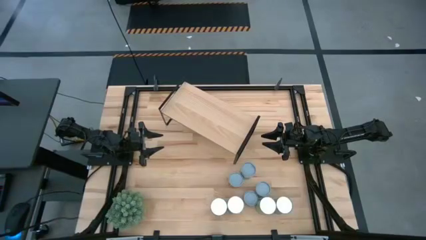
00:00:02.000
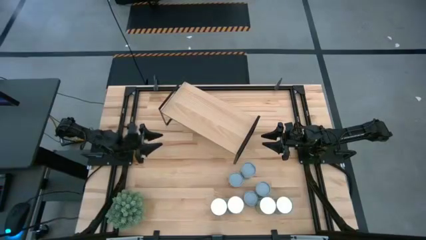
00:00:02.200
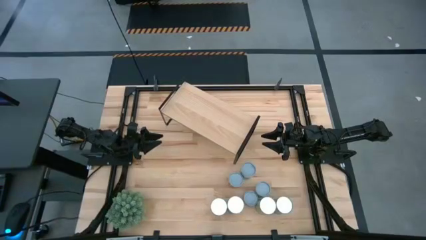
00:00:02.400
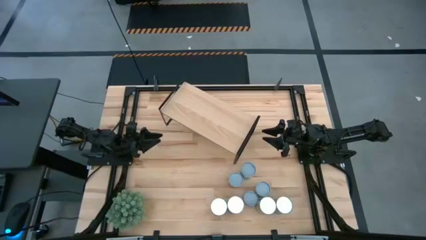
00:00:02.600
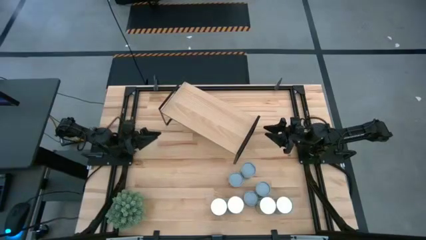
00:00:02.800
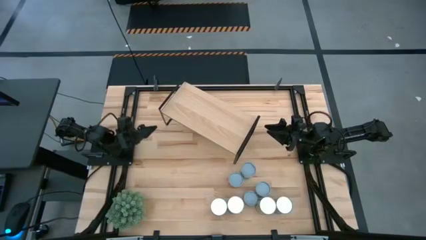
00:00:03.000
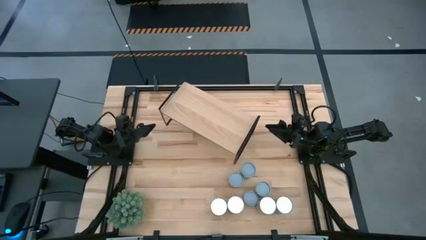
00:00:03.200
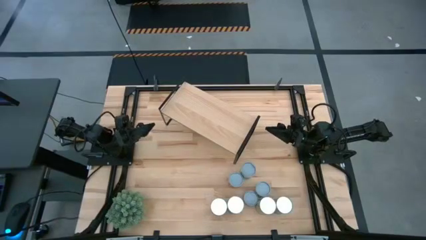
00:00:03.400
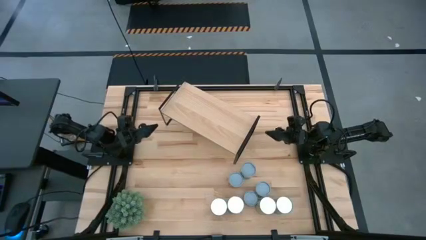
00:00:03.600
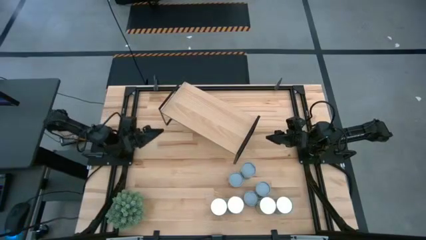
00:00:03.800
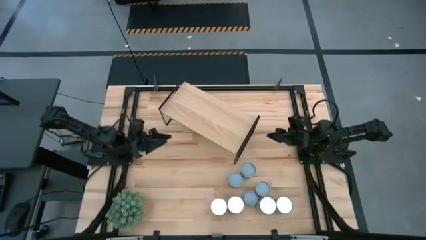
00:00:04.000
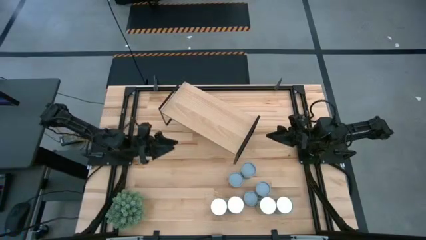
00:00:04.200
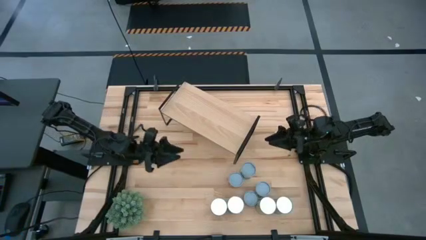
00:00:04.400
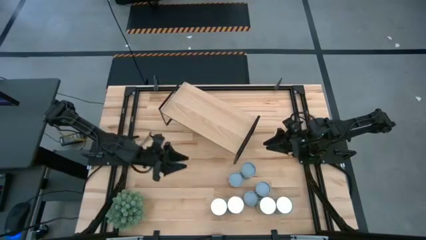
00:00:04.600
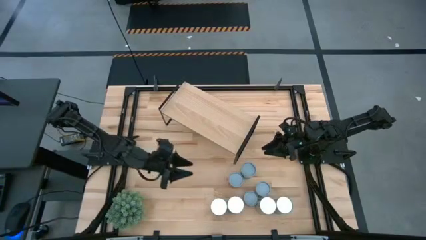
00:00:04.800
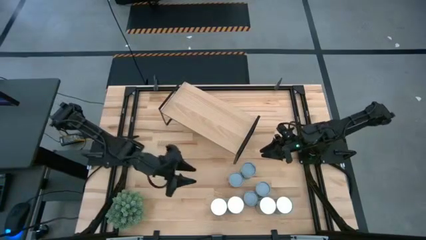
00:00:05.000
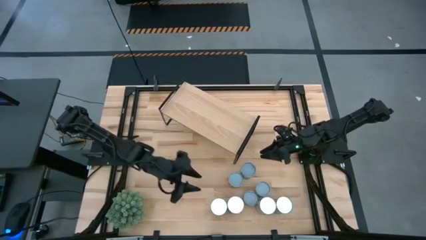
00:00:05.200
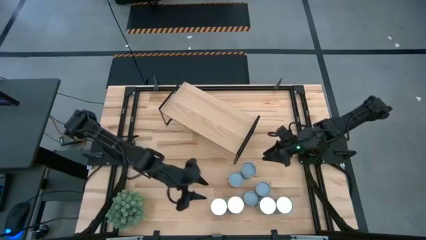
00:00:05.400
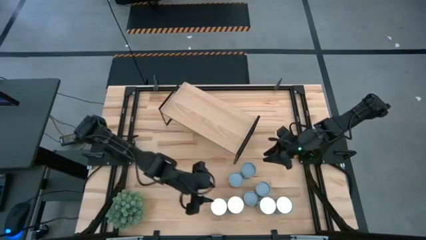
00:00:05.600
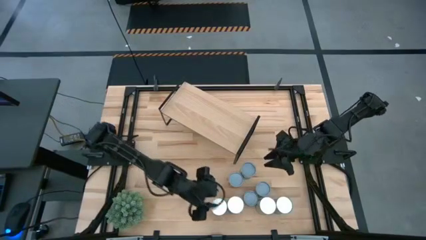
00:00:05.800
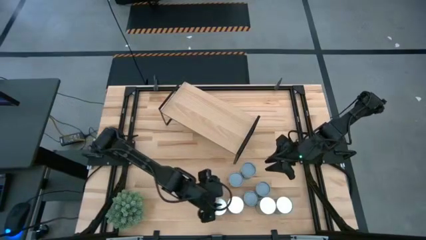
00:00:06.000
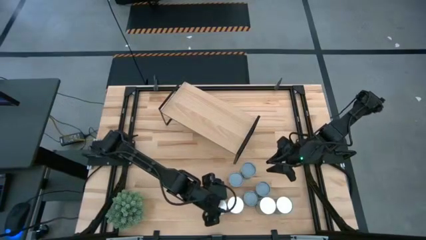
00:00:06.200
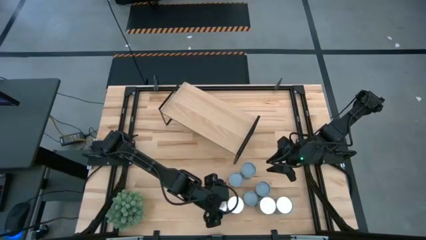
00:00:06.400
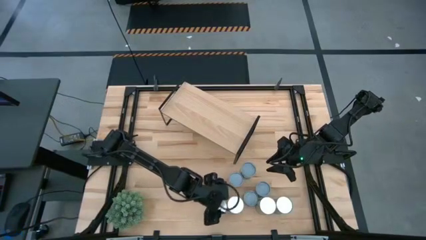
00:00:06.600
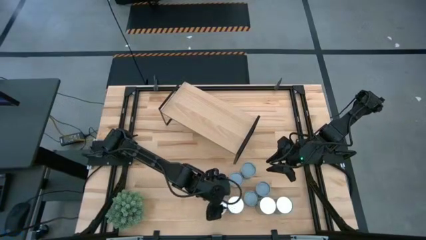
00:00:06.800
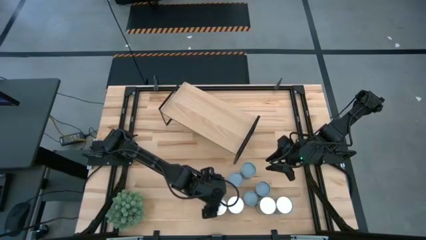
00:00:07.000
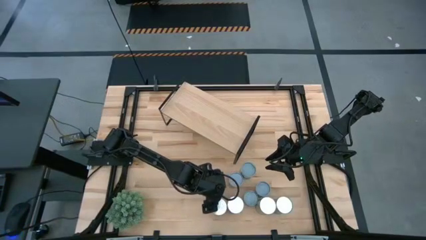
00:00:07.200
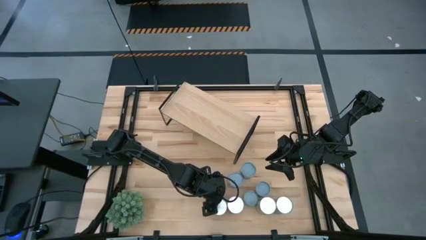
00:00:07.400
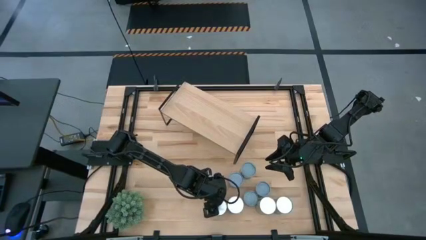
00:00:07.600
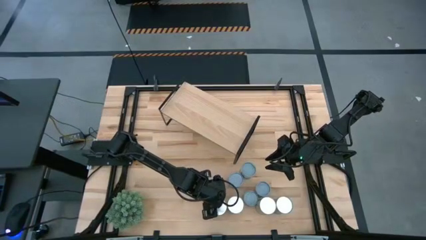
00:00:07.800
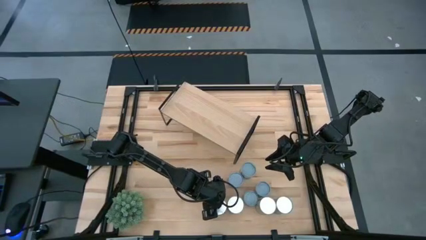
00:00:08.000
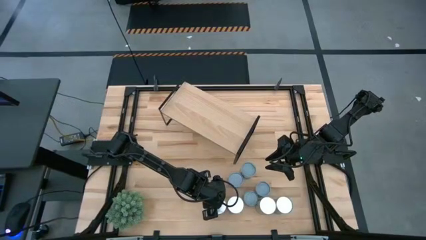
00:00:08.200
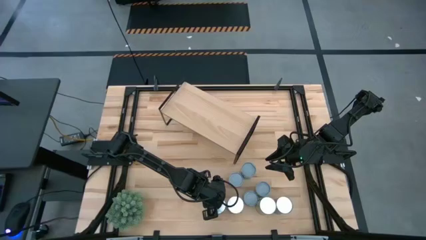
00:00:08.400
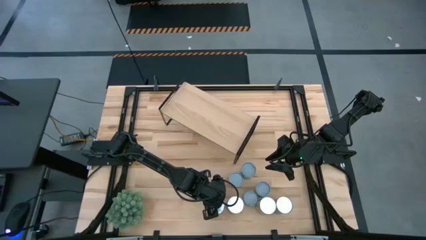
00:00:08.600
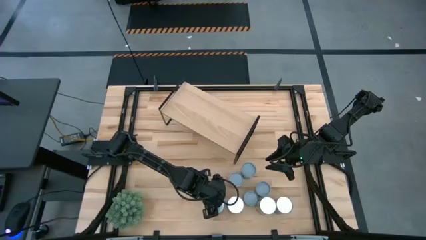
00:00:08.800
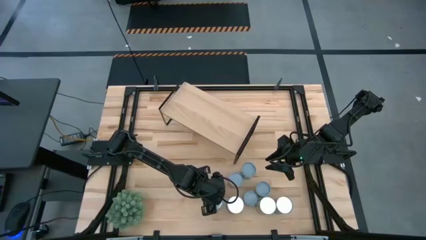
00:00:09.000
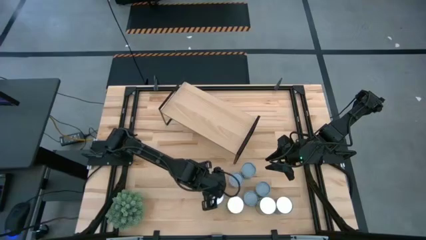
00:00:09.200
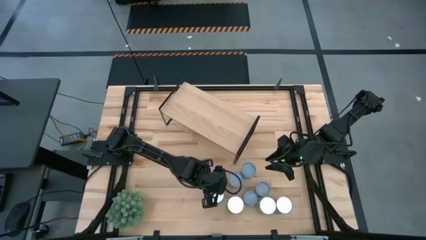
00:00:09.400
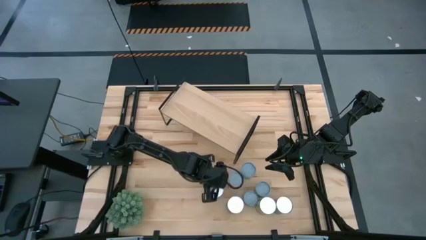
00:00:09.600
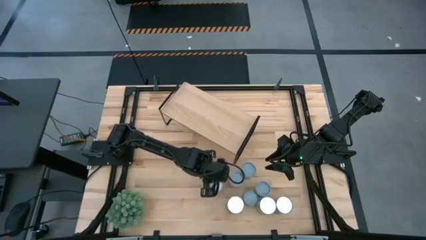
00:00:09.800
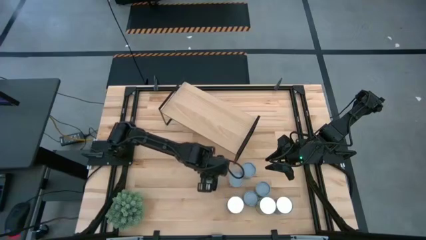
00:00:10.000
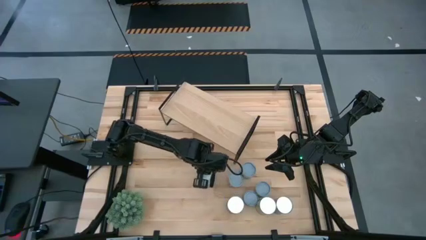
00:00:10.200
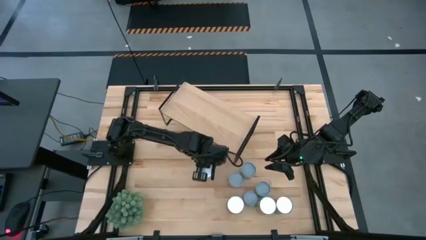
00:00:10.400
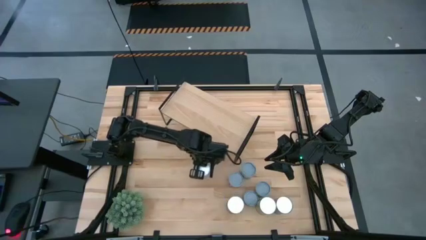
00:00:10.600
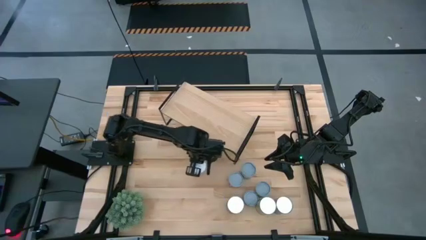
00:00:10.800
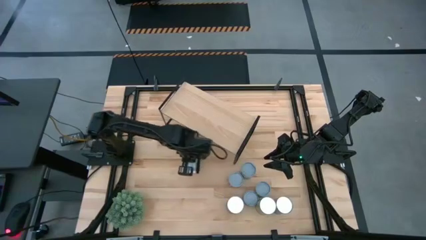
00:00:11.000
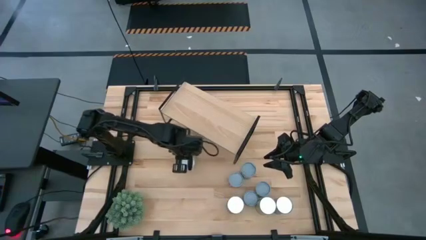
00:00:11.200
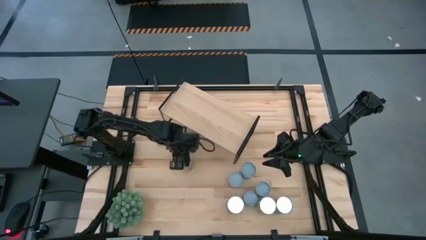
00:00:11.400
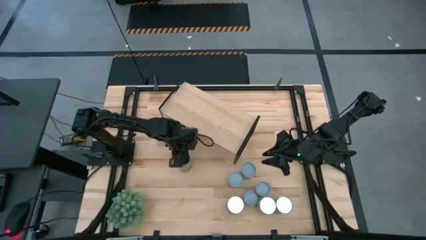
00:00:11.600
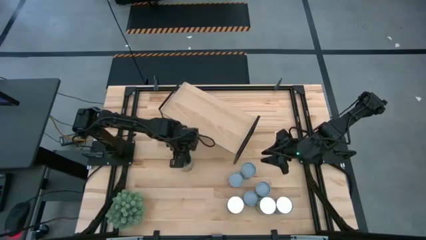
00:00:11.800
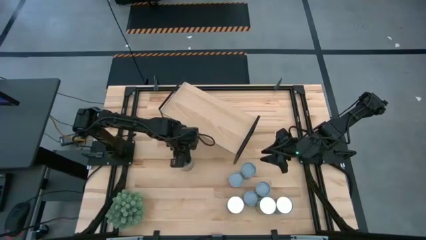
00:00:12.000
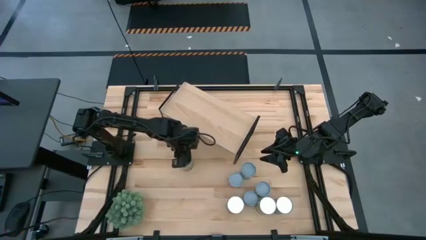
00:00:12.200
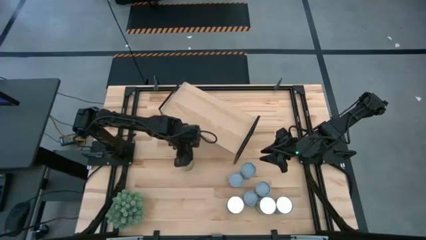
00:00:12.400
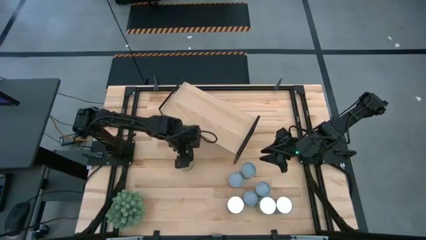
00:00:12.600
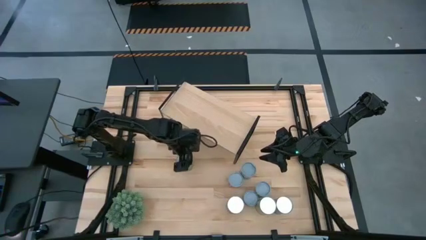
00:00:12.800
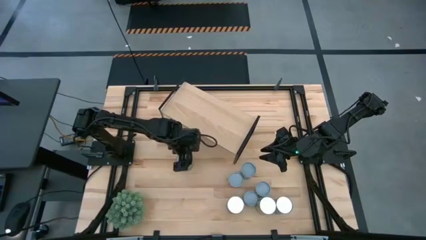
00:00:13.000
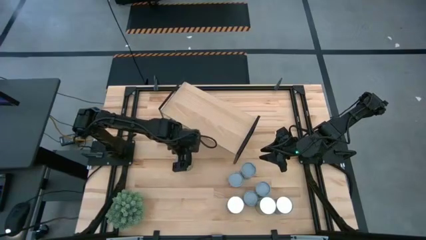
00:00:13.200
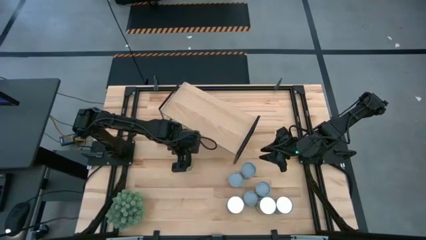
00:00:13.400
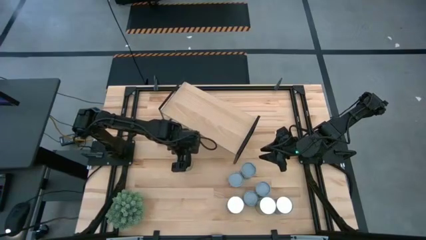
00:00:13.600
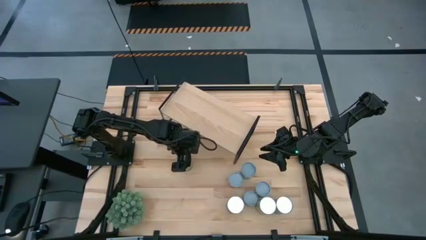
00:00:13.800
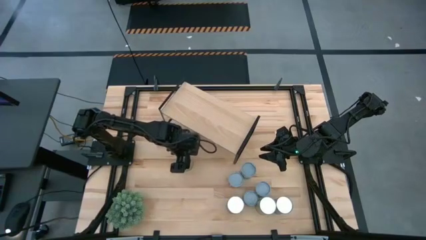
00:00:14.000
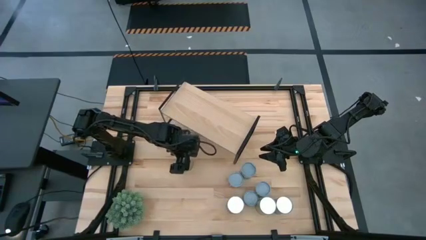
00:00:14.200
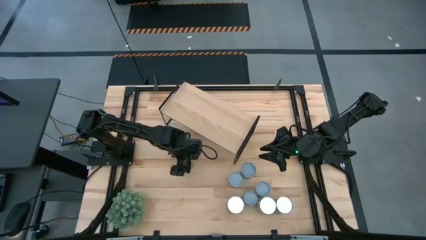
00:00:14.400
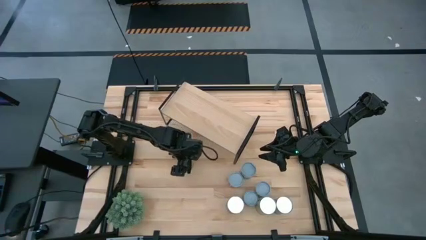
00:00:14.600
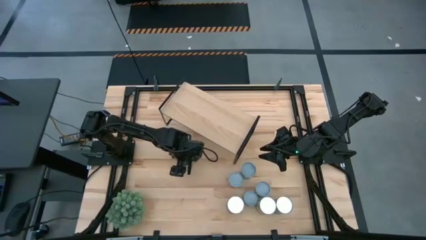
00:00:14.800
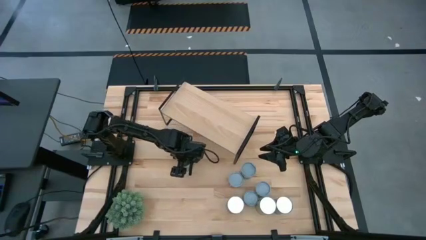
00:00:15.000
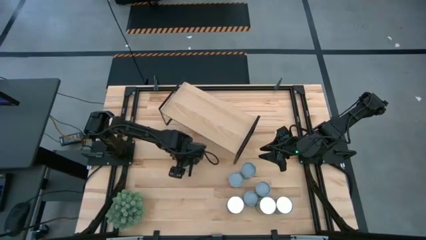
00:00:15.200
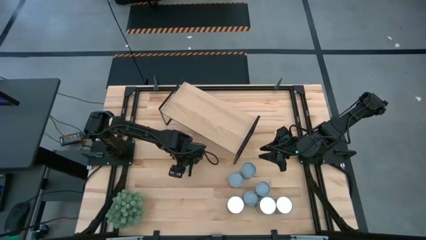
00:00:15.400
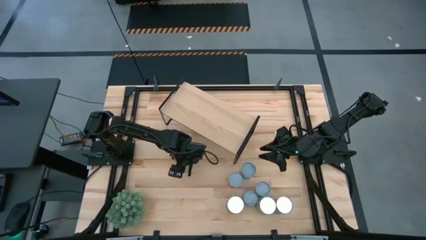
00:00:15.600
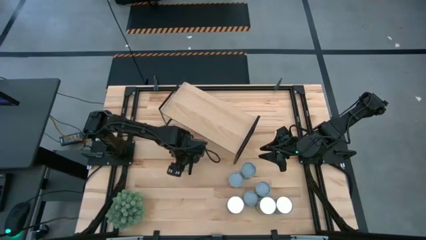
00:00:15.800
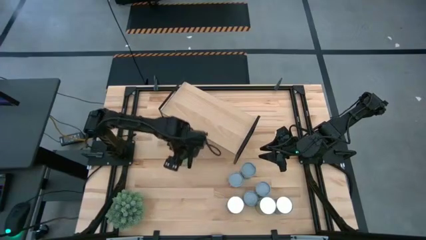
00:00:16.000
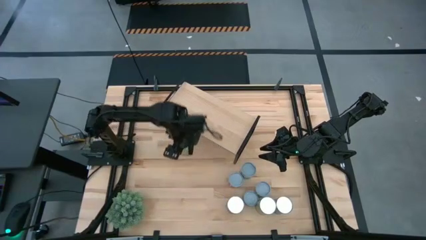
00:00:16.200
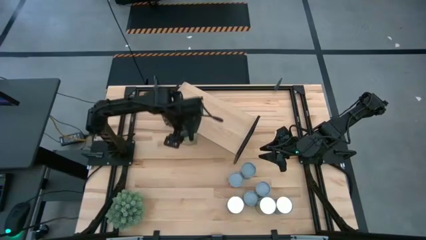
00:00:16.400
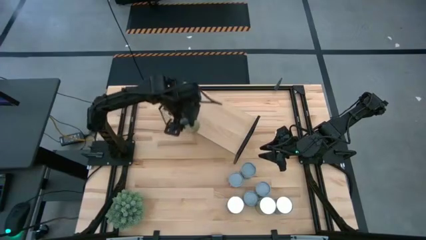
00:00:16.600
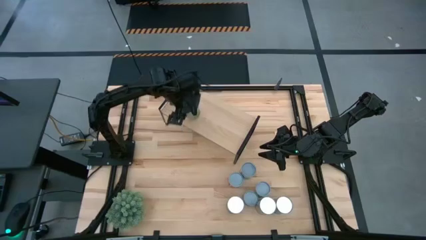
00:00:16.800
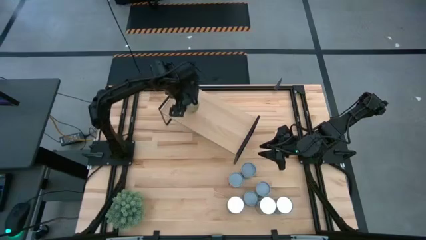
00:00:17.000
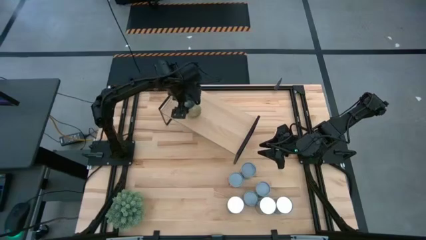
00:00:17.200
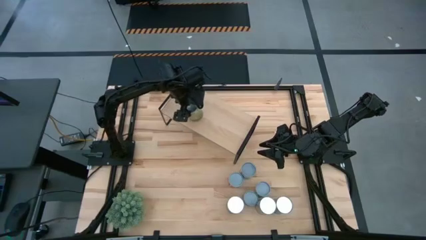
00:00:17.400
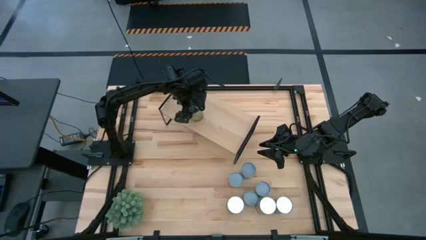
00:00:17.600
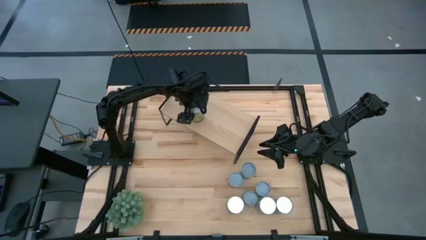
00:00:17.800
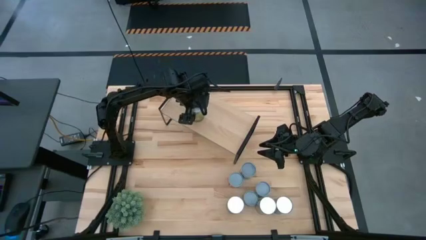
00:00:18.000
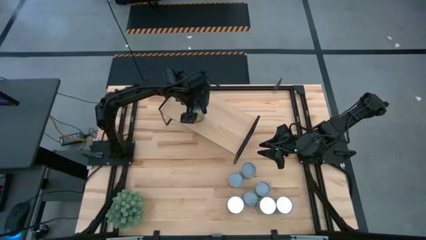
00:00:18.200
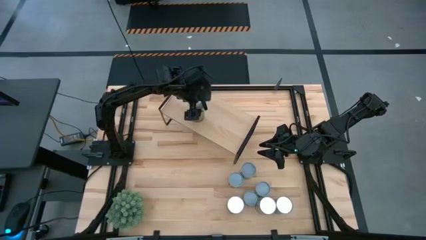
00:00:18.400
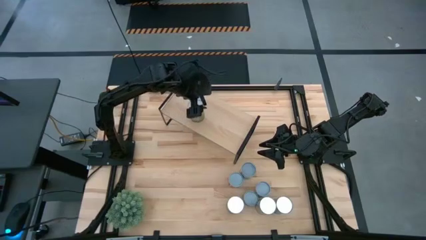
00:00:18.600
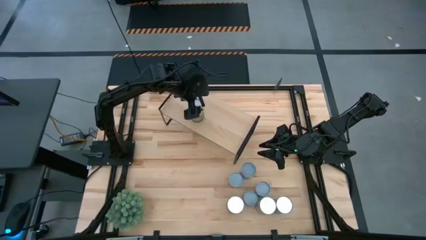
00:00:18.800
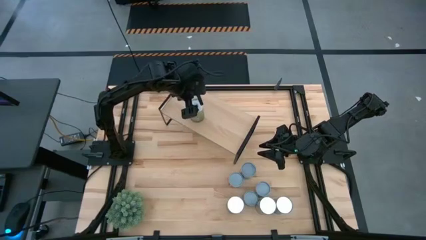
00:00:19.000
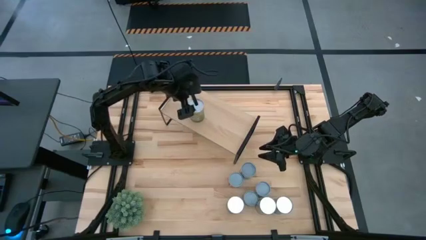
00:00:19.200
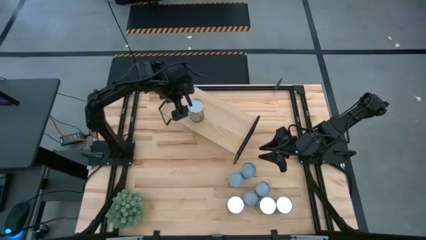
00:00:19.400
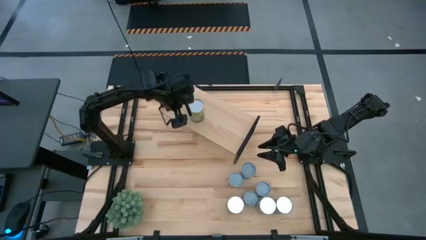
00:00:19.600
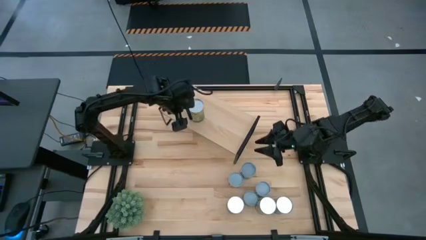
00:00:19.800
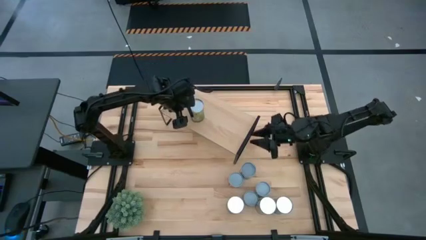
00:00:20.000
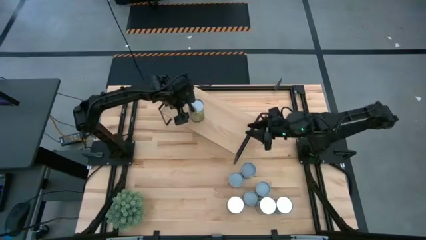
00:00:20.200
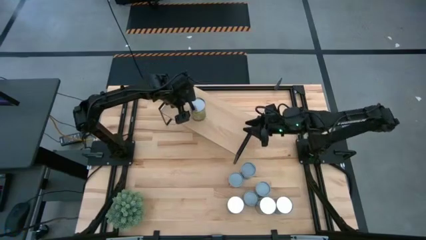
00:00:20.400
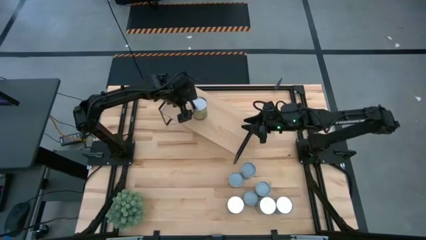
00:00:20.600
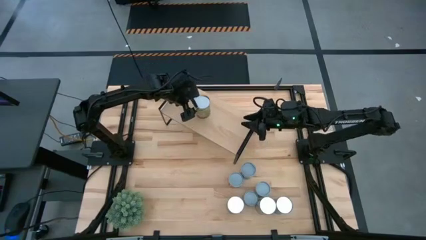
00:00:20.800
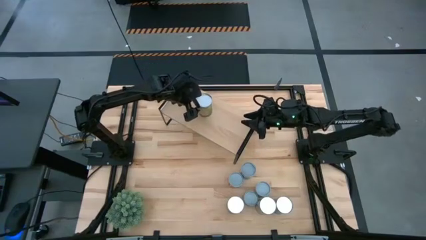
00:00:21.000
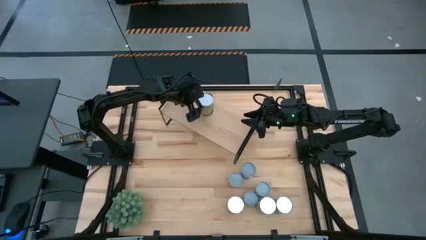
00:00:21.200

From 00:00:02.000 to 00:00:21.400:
Task: Pick and place cans onto a shelf
Put the canned orange on the shelf
